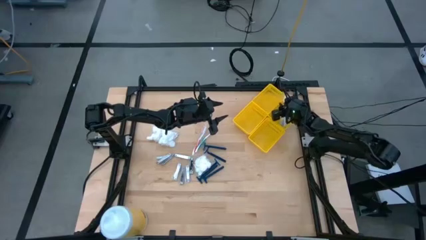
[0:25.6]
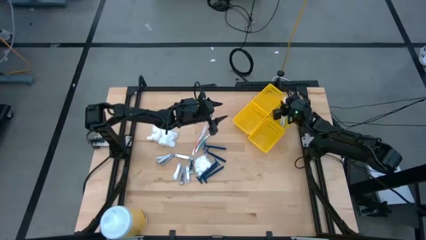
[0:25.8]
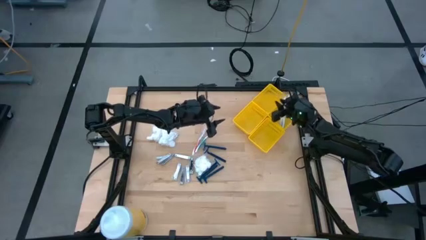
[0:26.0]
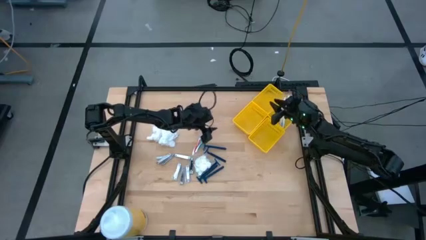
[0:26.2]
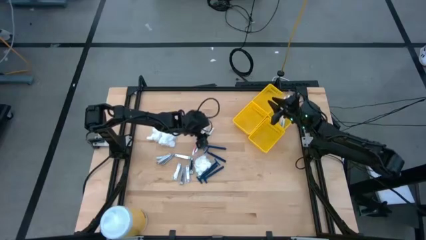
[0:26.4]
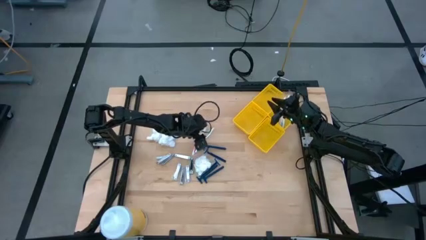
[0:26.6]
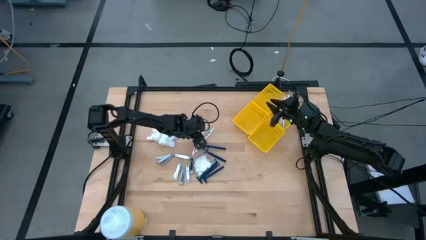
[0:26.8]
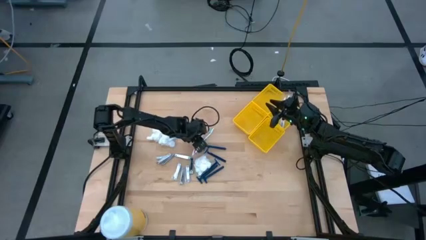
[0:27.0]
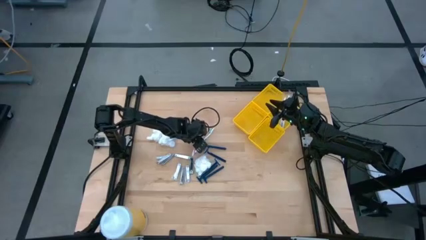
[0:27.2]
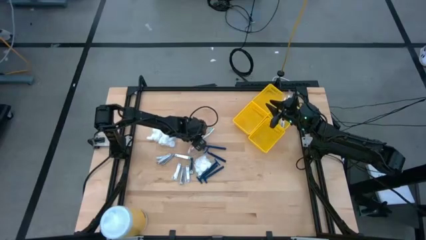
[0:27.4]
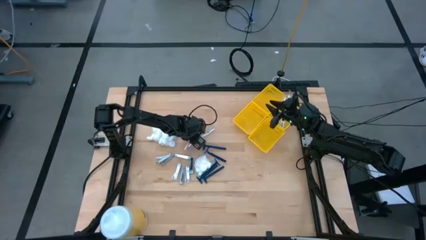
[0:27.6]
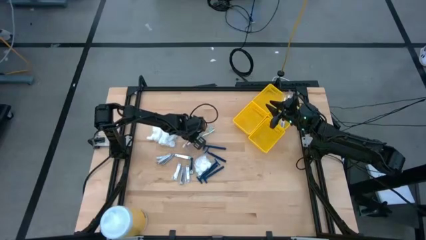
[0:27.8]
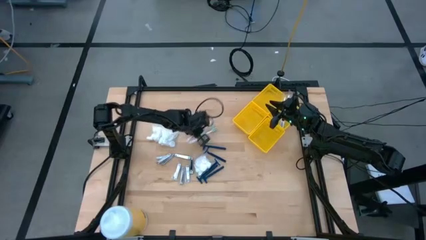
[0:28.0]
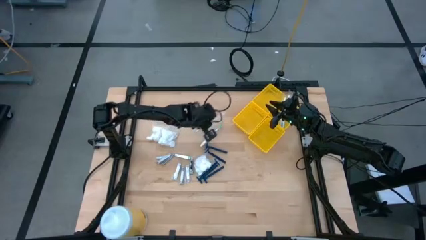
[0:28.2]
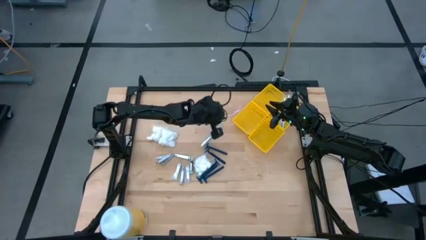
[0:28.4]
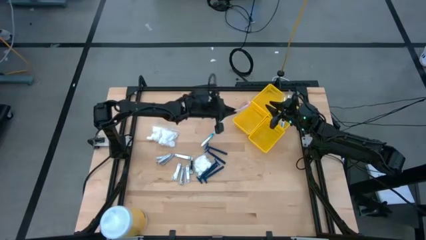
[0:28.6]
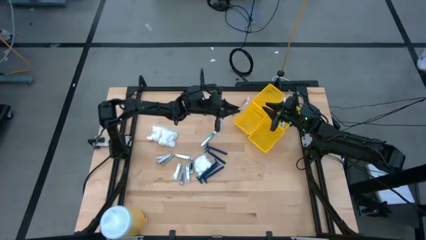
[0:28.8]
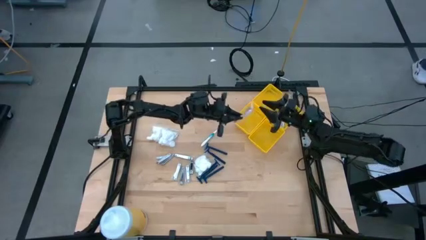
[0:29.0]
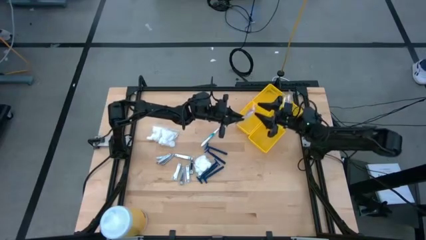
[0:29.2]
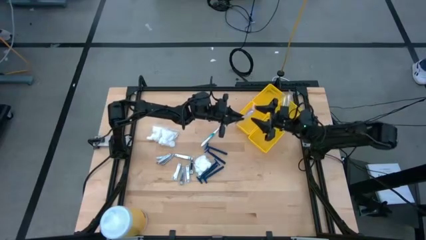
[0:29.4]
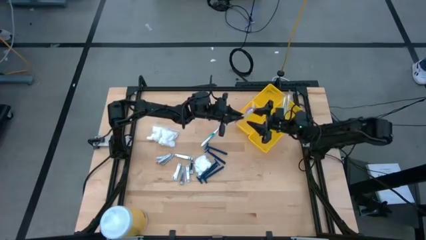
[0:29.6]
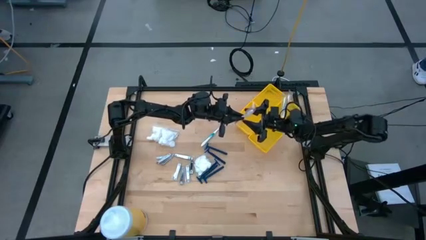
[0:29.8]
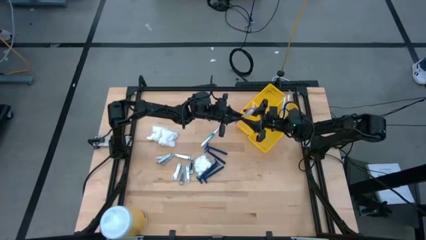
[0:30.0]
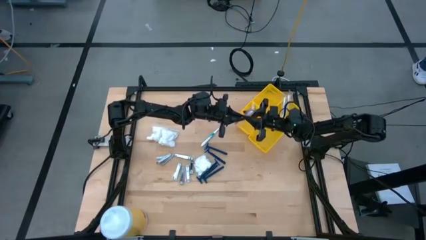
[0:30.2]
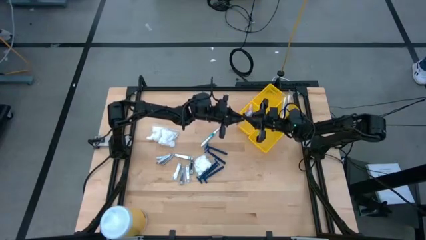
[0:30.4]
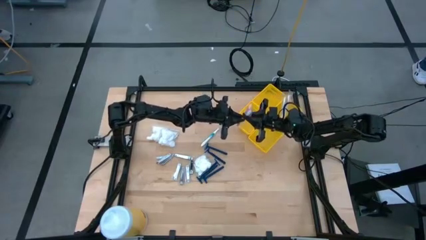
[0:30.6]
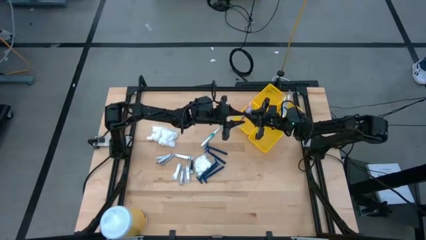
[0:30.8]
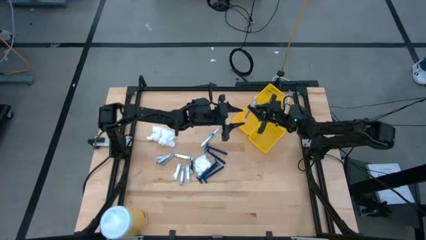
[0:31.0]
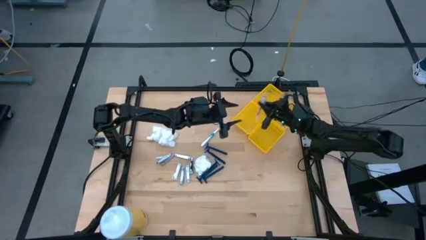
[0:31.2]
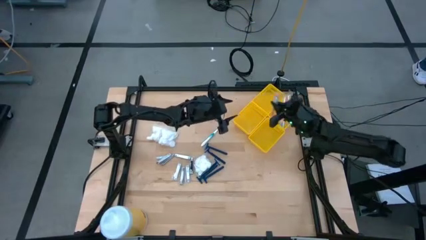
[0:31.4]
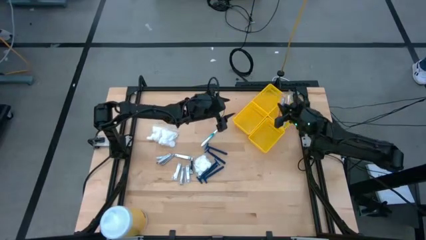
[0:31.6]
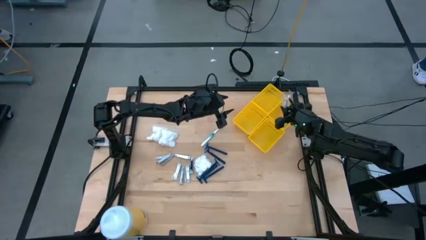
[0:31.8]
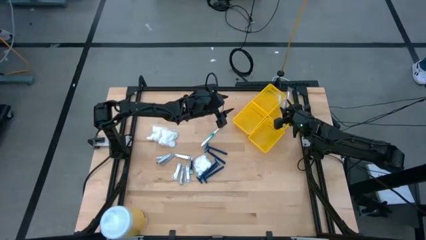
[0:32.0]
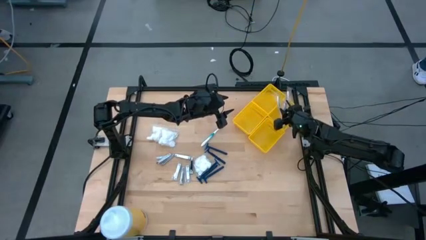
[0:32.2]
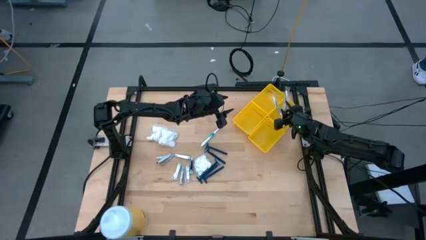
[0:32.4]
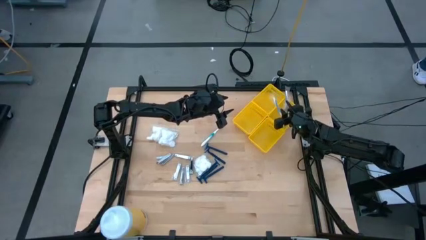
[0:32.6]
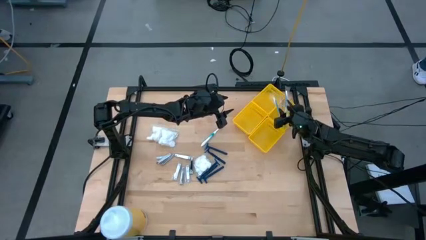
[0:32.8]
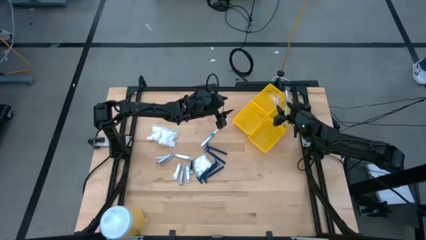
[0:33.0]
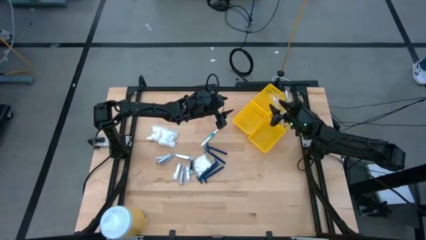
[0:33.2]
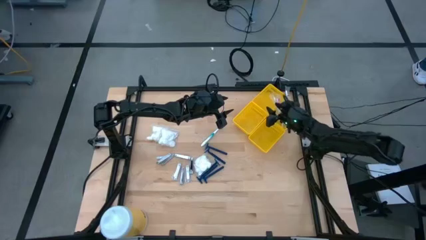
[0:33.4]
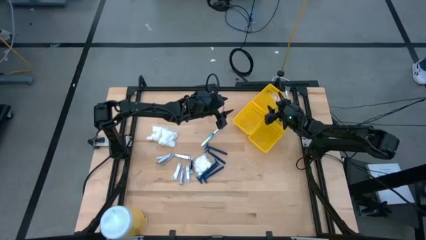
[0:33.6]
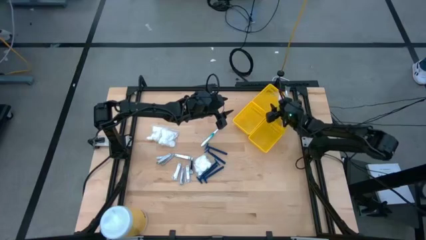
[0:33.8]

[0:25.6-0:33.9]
Task: Pick & Place Travel size toiletries
Put the orange toothbrush into the top right yellow bin

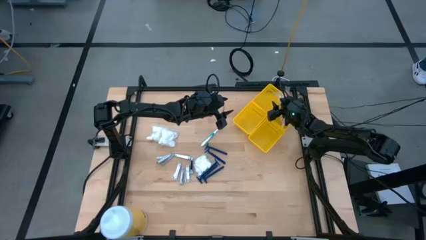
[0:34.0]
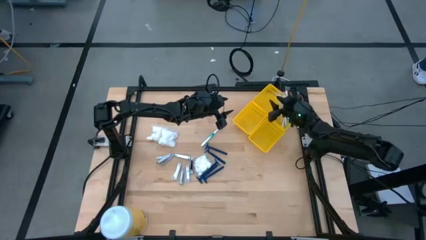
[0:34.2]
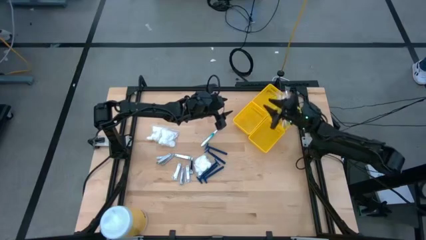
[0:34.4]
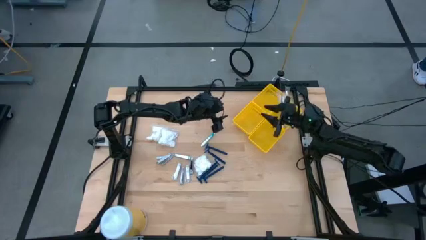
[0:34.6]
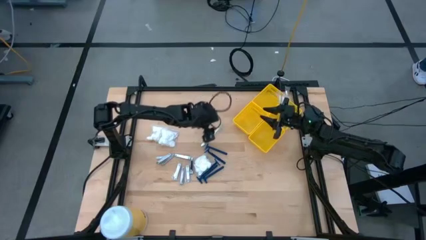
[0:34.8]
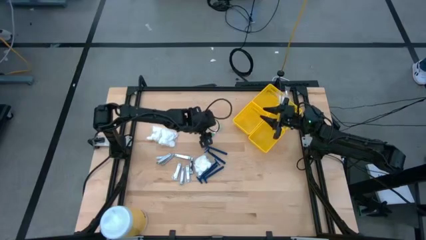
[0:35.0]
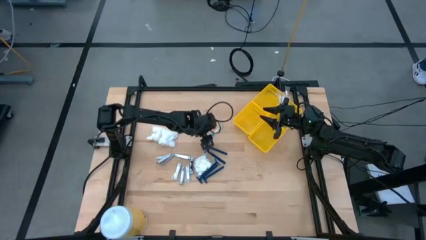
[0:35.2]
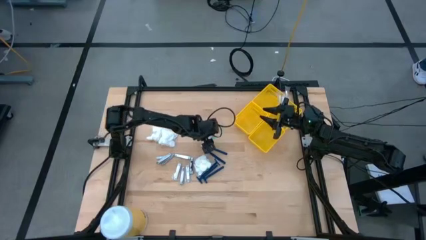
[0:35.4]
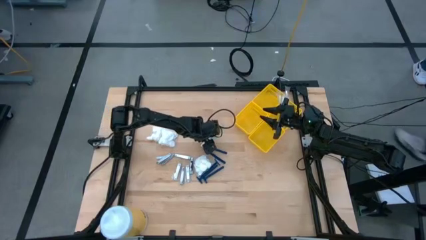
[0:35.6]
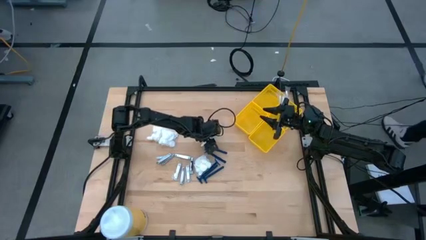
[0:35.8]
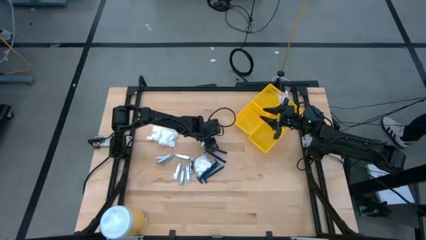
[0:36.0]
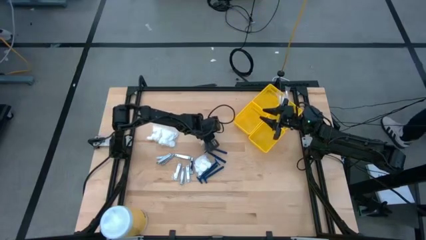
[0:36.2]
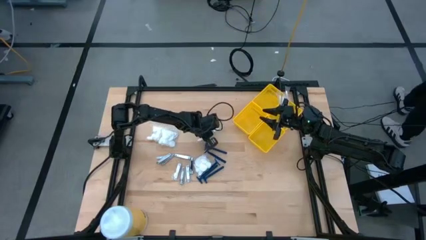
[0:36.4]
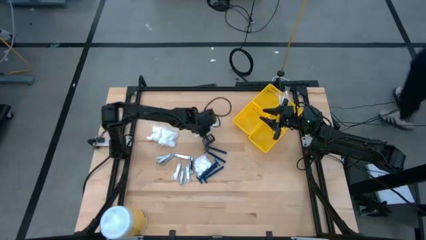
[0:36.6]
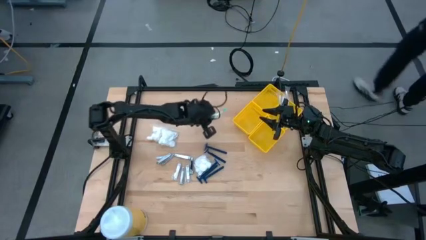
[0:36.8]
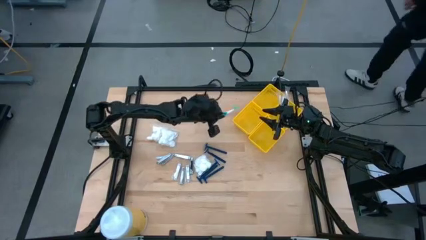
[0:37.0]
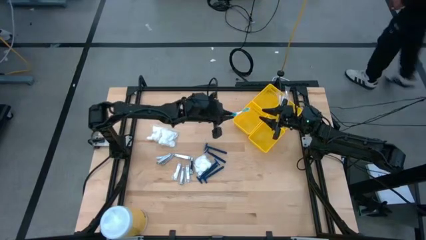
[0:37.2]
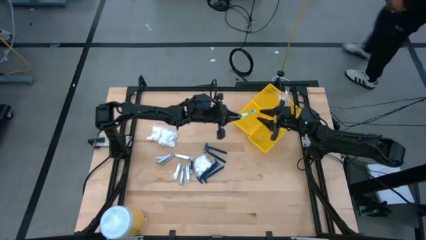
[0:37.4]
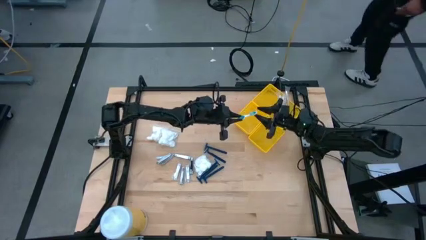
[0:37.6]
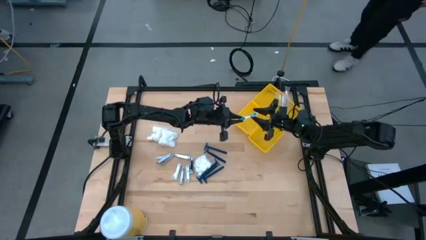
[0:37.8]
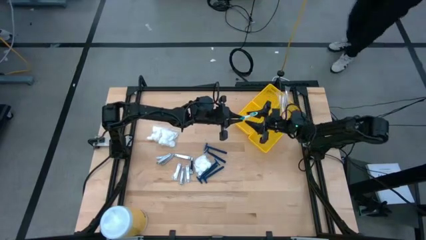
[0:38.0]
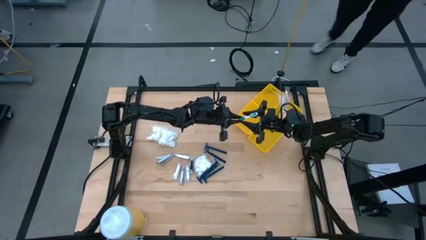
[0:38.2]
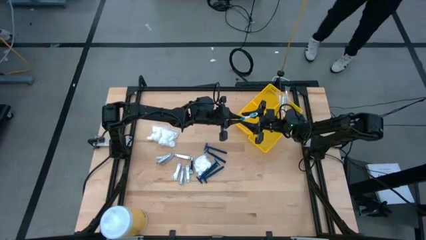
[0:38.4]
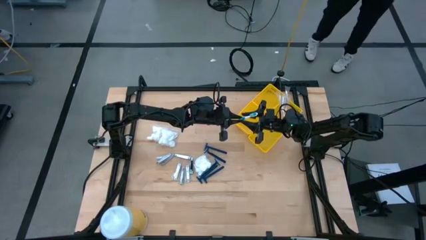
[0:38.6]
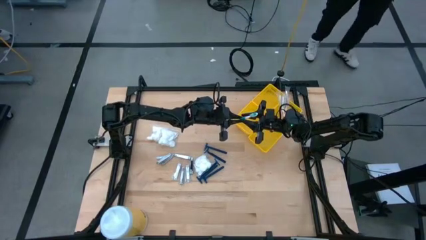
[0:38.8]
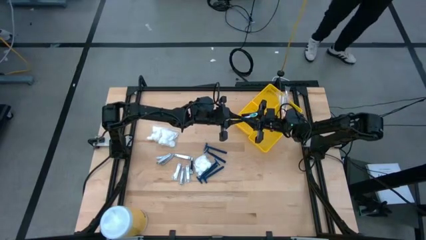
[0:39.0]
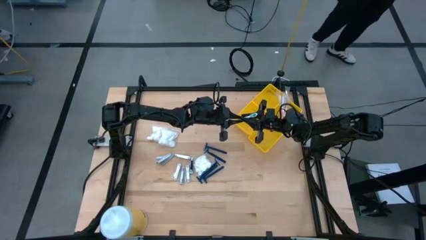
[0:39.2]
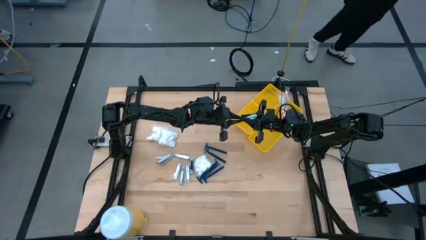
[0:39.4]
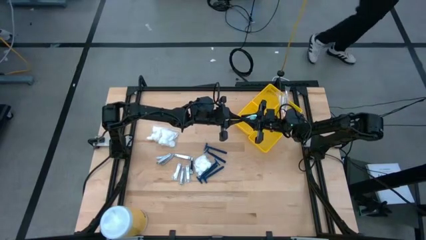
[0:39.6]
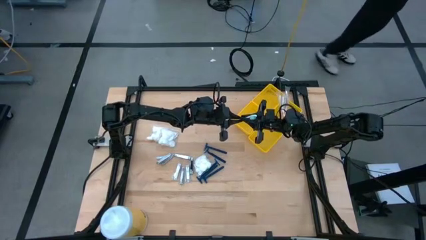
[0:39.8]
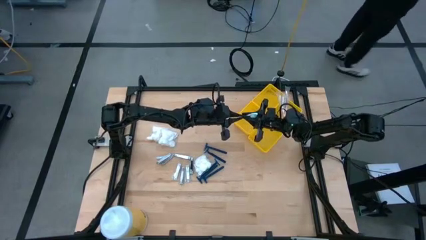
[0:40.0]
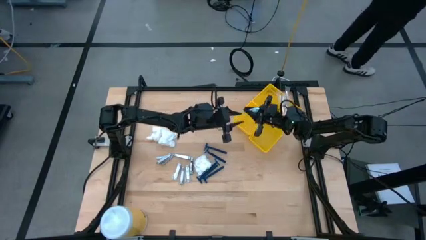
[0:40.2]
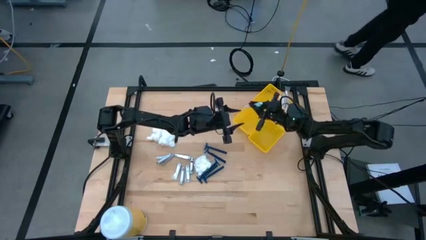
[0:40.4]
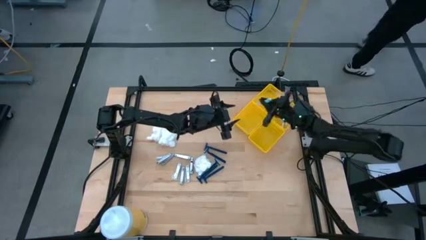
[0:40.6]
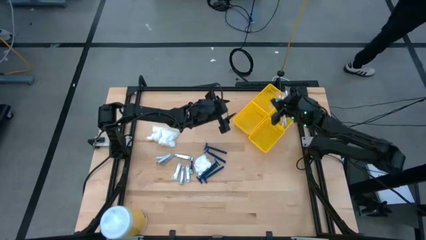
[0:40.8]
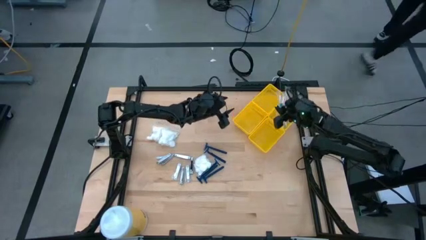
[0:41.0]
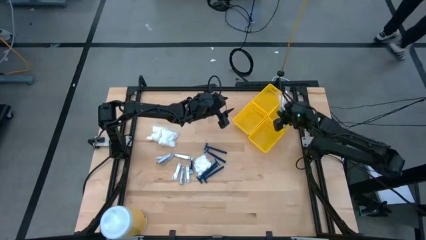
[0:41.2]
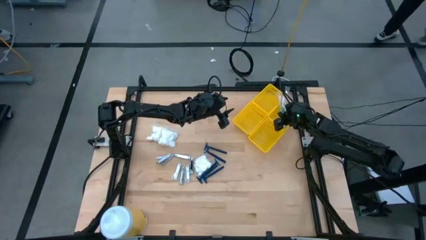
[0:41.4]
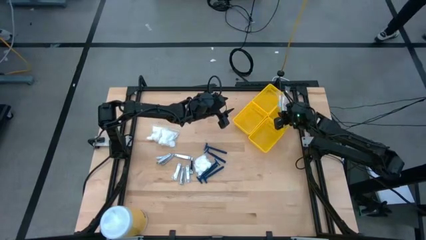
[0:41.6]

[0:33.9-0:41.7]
Put the light blue toothbrush into the top right yellow bin
